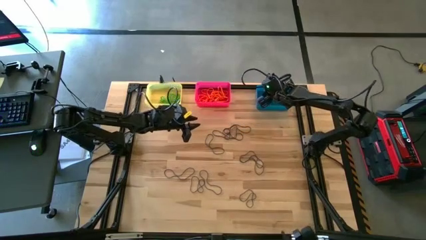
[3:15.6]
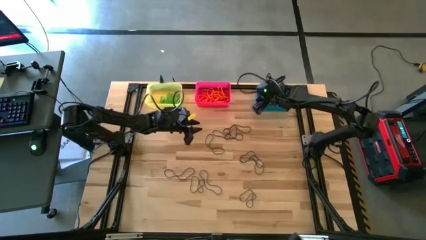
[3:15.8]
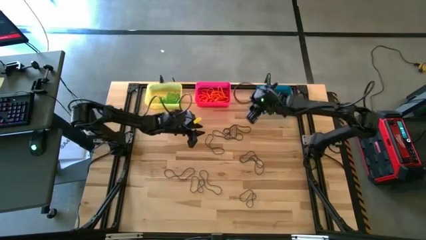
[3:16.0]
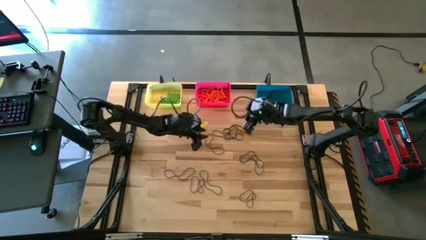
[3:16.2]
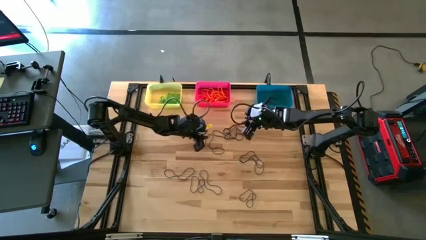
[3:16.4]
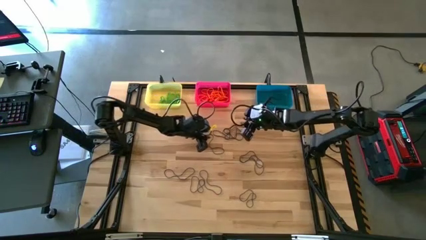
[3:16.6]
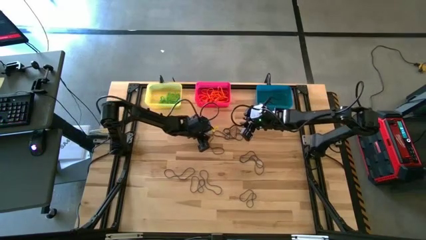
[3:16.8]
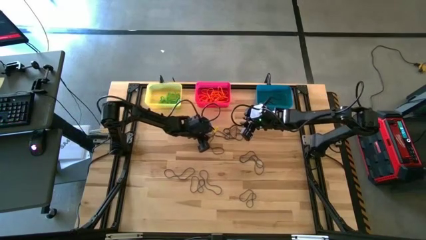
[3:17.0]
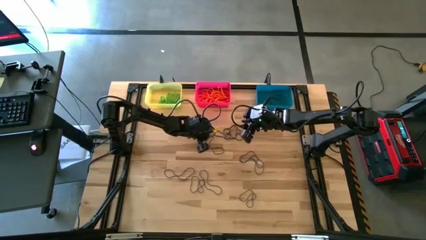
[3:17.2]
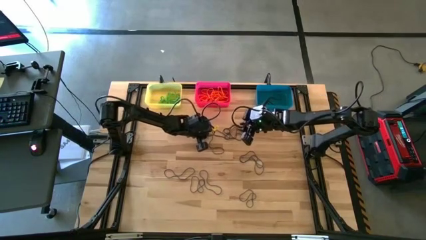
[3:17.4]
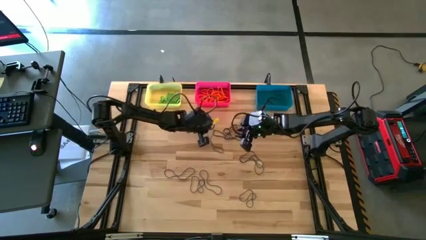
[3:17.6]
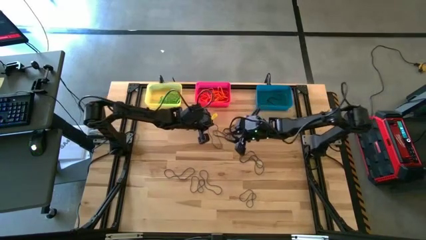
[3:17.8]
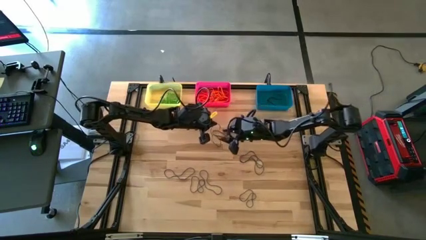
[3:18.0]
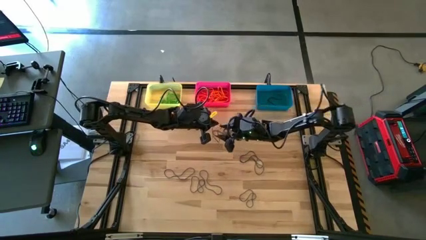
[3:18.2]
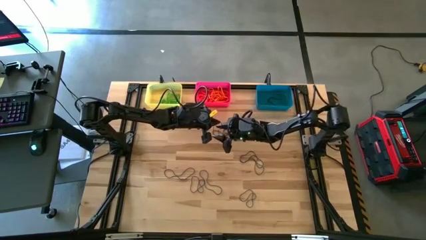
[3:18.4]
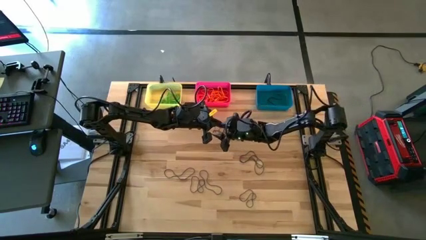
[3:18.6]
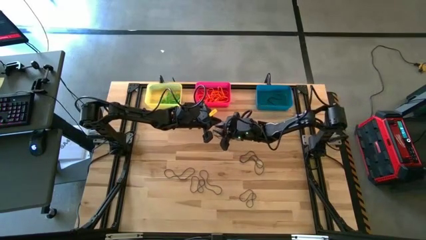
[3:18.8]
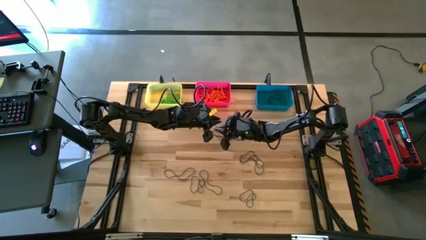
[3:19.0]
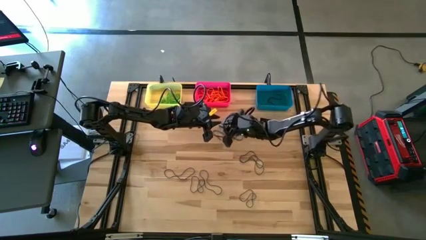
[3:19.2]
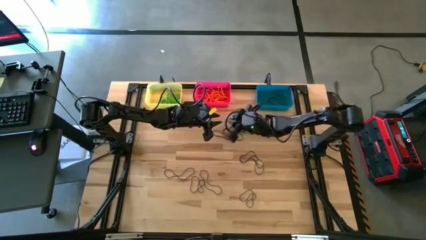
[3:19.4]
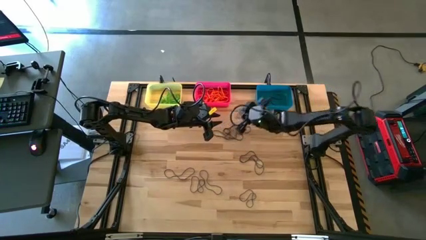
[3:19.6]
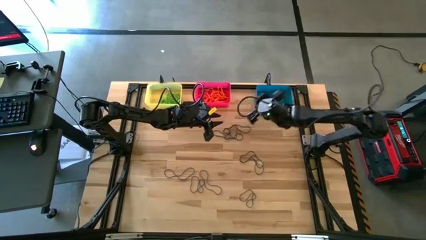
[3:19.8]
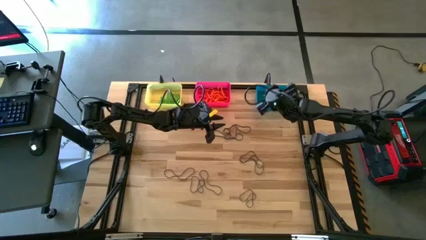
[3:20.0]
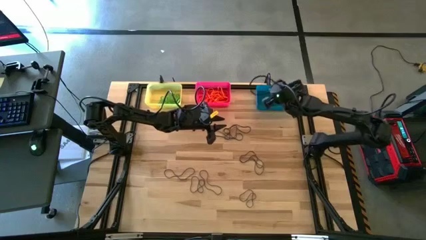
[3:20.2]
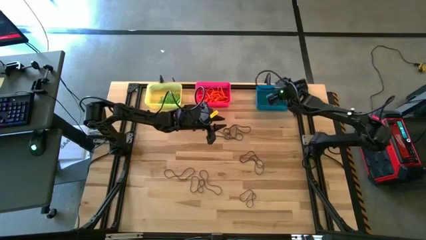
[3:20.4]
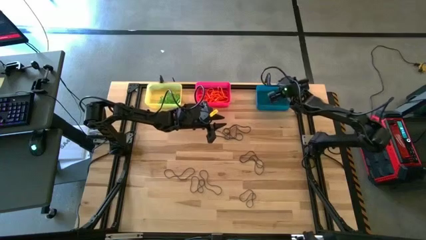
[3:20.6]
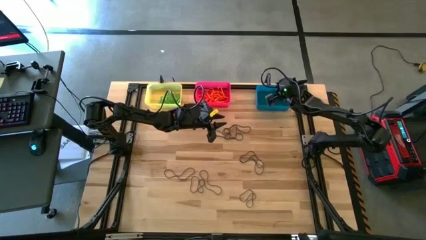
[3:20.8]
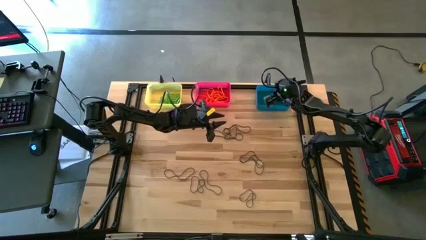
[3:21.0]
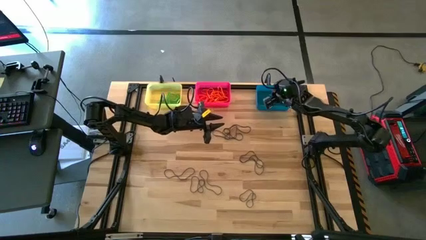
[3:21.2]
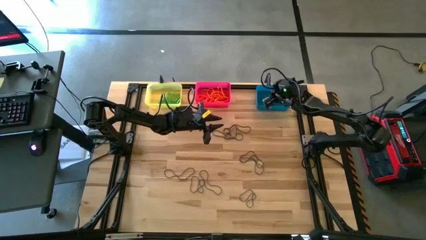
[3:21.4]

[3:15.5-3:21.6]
Task: Sort rubber bands into baskets
Put the violet rubber band into the blue bin

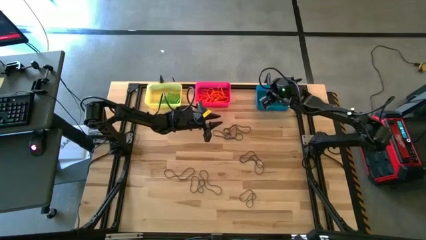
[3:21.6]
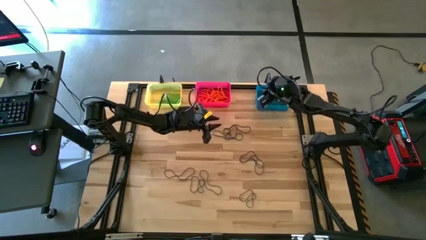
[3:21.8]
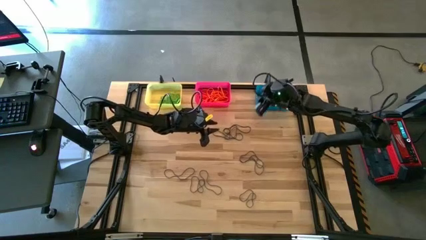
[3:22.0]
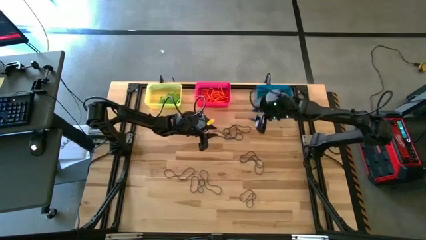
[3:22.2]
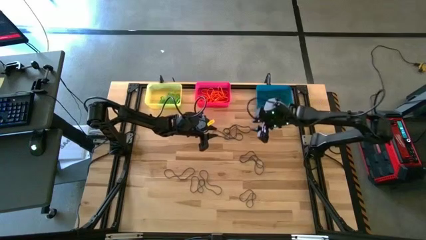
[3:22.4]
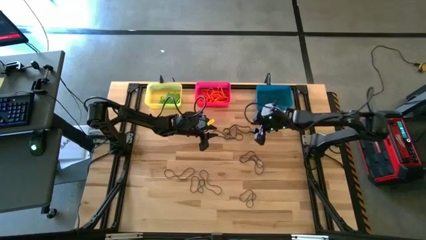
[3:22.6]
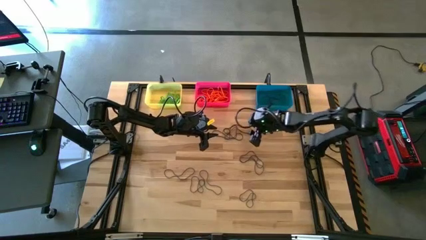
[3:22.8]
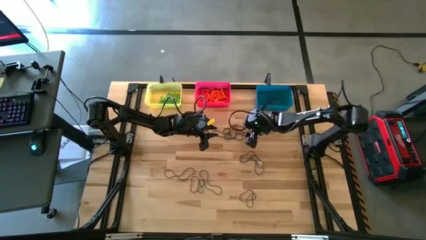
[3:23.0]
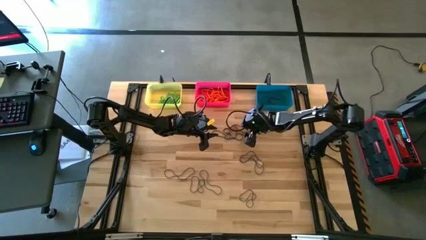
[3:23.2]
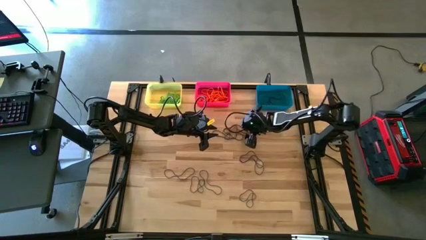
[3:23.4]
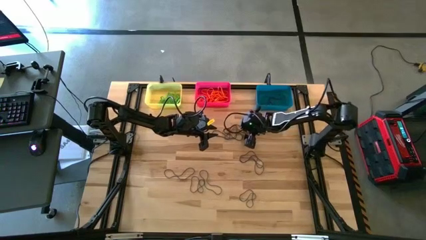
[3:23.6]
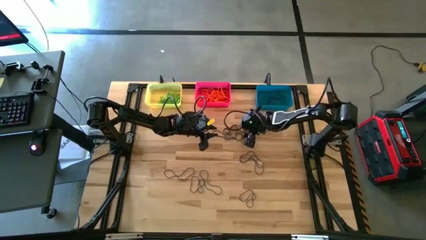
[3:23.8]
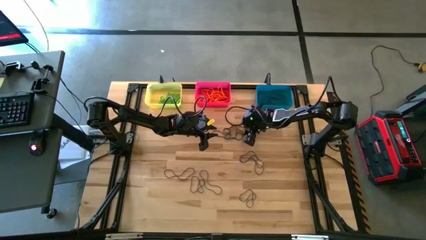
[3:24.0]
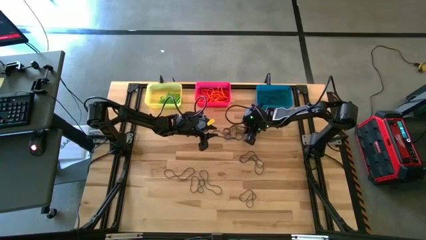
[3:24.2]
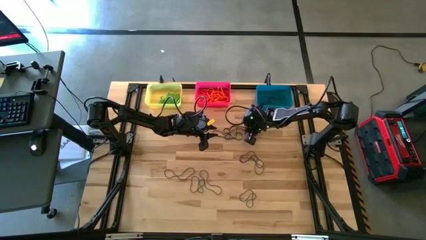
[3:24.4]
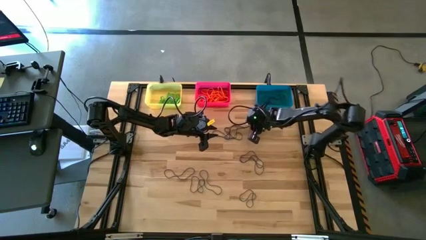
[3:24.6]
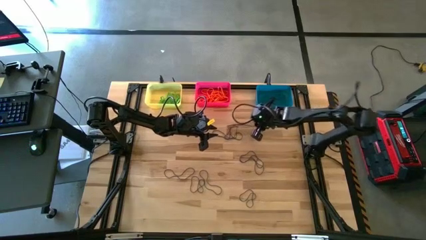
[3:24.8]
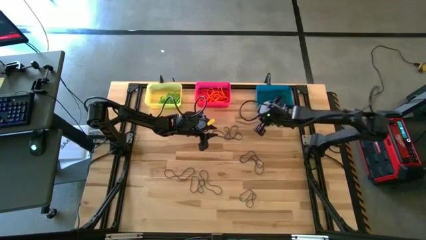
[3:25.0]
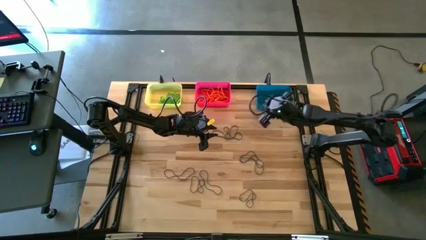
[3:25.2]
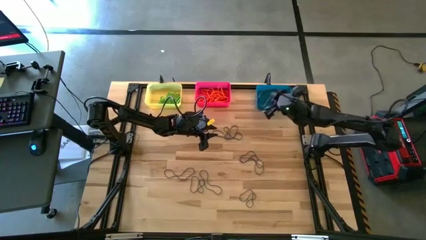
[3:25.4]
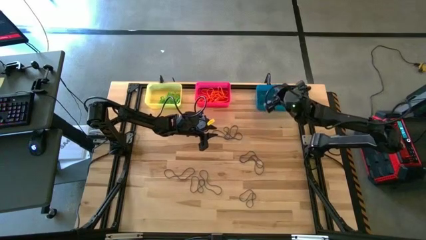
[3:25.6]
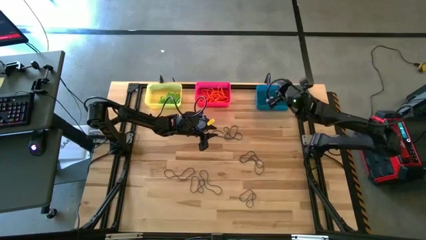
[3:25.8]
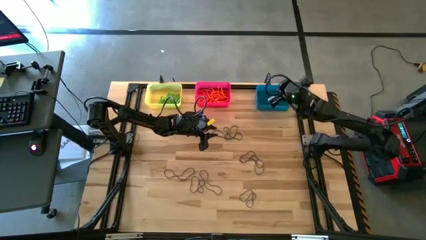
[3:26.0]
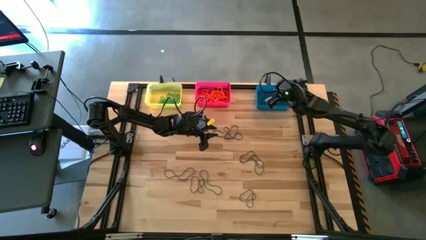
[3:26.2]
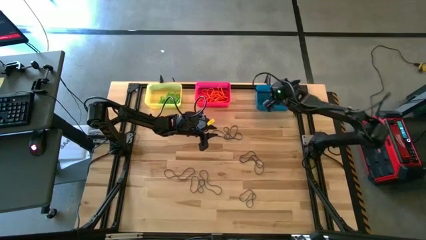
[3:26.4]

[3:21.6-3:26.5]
Put the violet rubber band into the blue bin

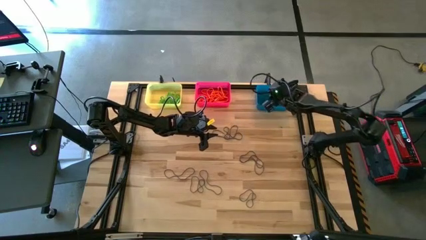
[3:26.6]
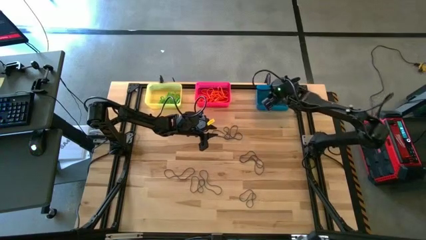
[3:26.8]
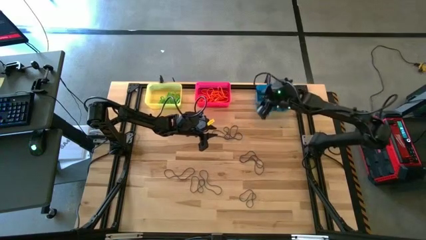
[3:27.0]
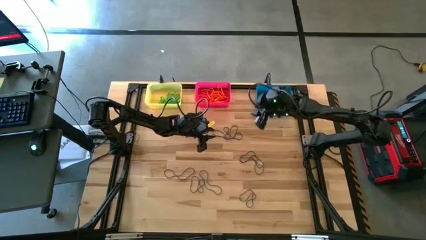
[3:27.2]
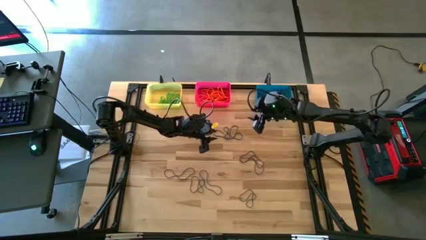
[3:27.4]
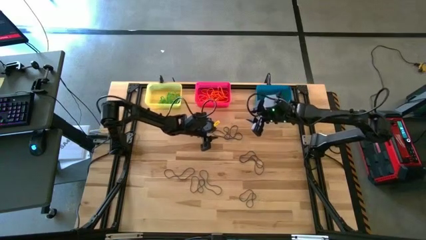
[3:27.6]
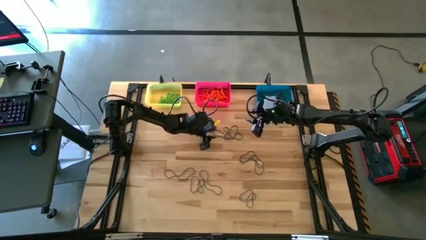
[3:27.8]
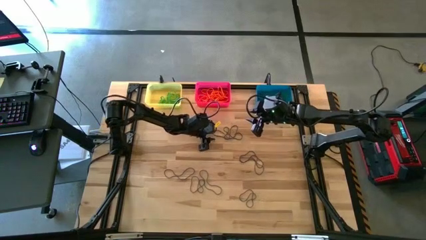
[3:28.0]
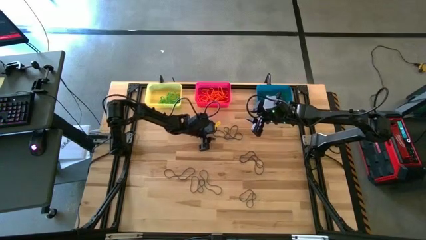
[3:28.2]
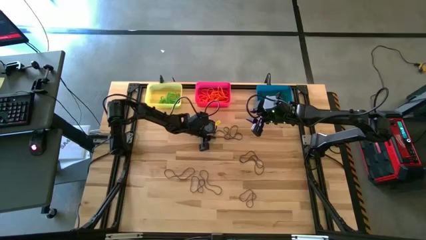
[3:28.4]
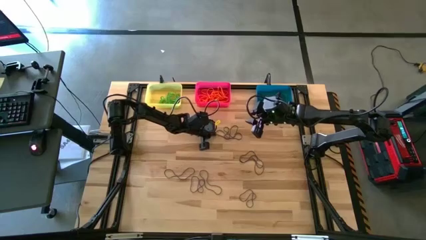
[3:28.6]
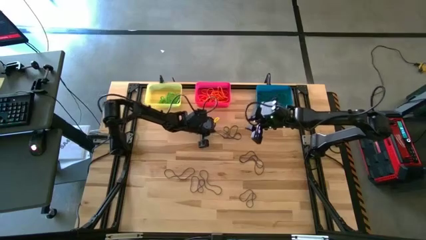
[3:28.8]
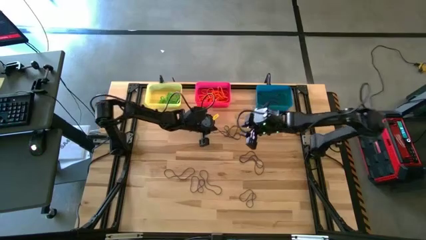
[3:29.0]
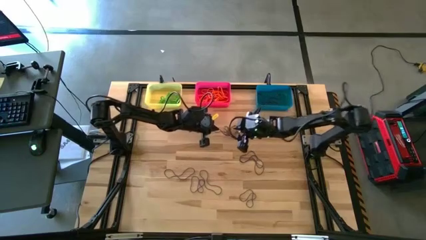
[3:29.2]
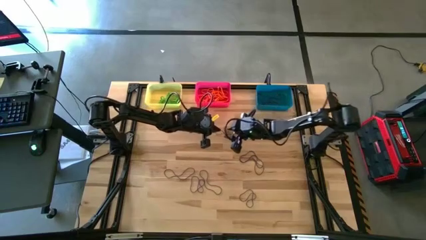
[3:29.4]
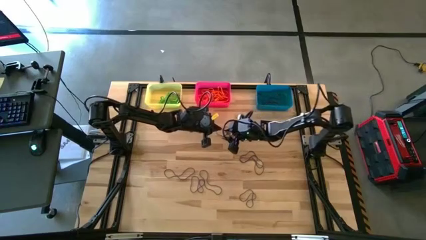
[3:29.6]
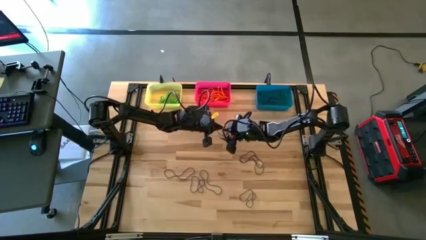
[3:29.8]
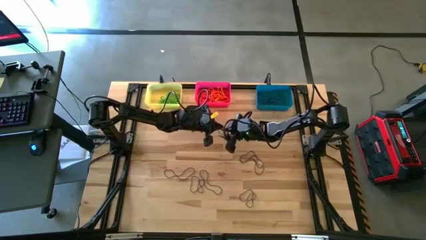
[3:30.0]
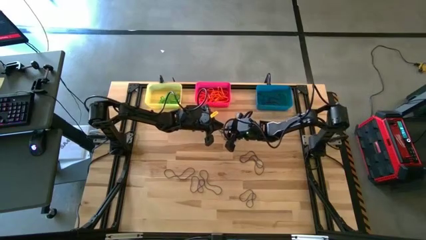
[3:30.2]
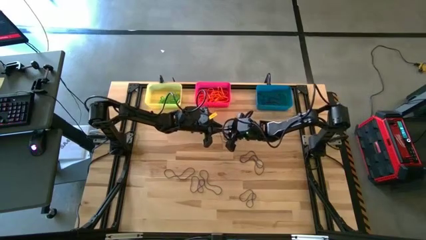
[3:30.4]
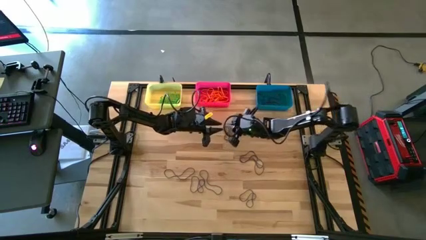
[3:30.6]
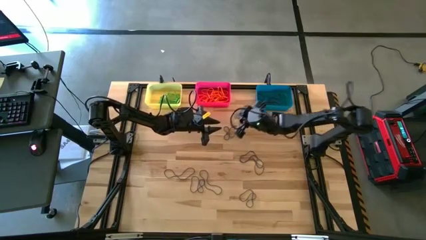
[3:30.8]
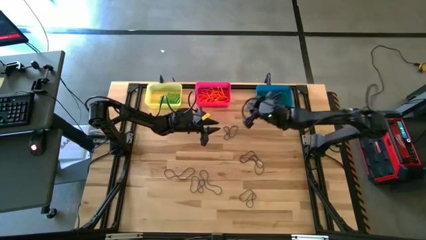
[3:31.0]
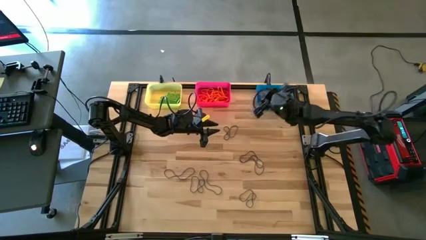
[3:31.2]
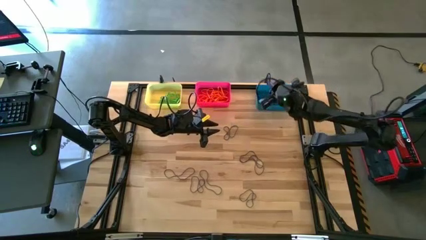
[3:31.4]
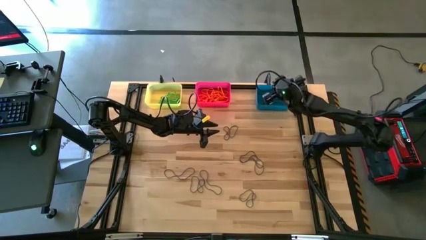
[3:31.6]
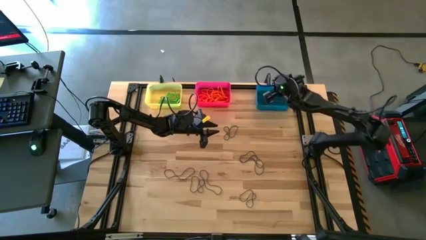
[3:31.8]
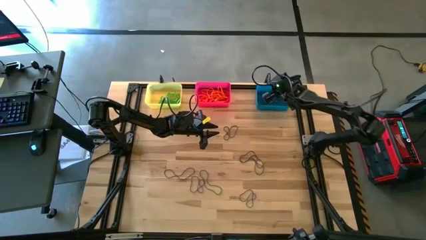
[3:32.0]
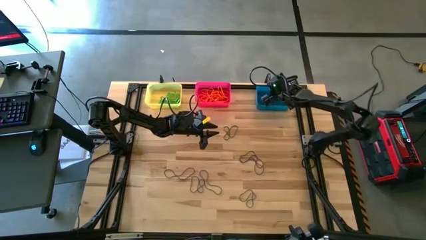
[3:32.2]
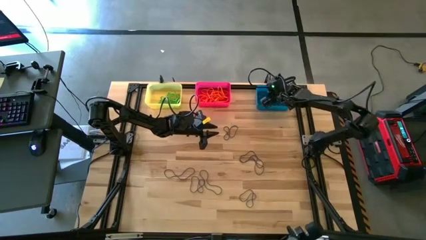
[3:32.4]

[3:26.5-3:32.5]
Put the violet rubber band into the blue bin
